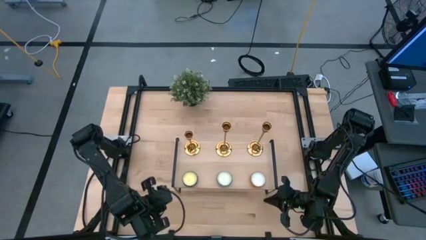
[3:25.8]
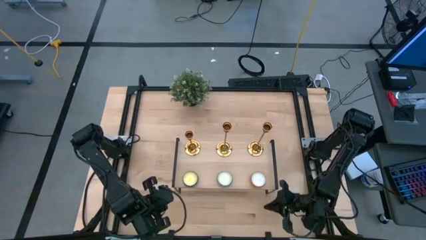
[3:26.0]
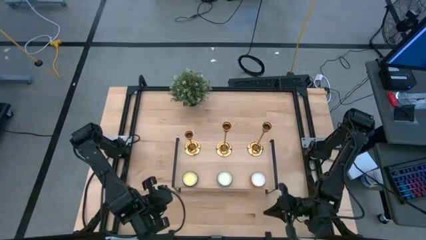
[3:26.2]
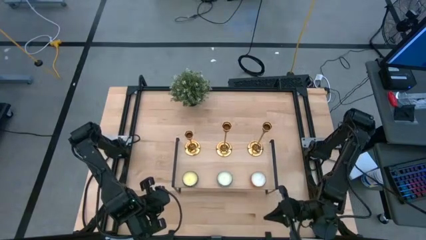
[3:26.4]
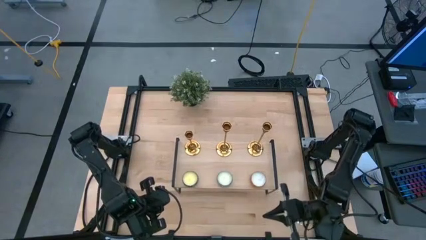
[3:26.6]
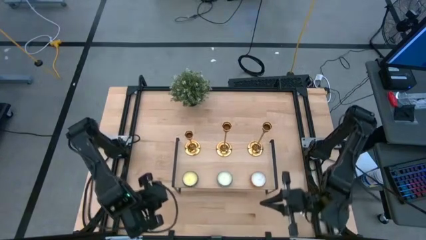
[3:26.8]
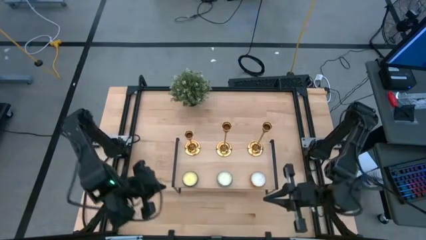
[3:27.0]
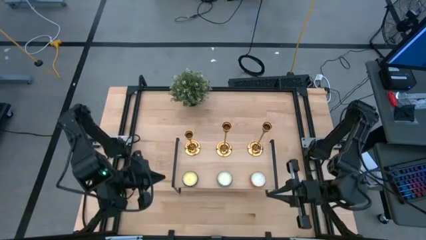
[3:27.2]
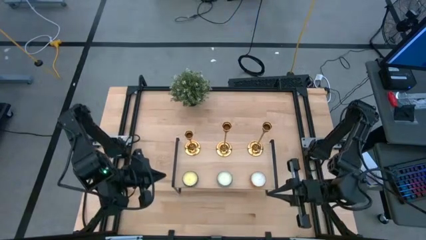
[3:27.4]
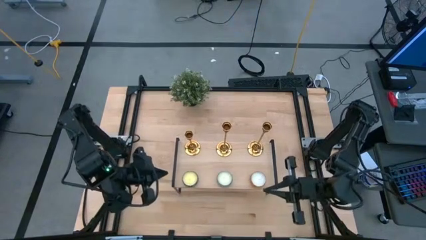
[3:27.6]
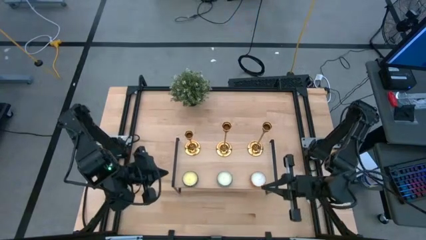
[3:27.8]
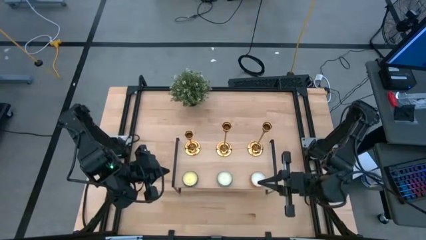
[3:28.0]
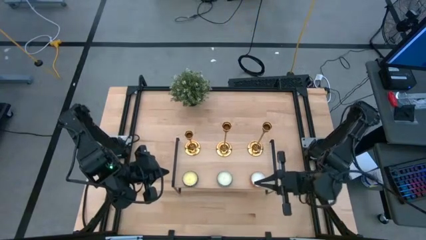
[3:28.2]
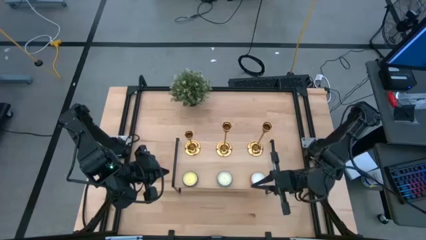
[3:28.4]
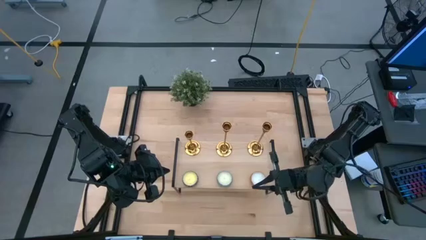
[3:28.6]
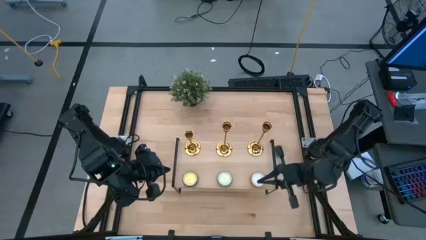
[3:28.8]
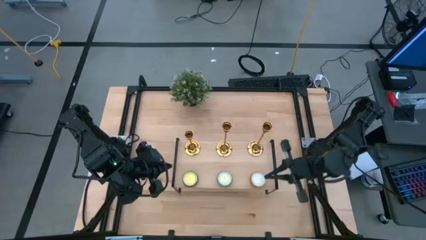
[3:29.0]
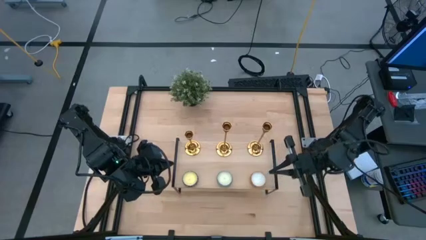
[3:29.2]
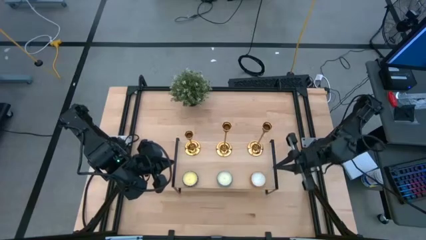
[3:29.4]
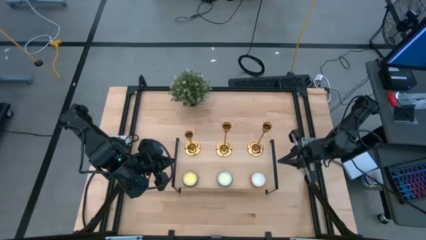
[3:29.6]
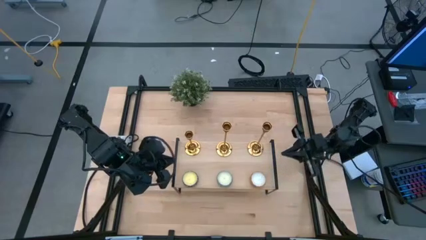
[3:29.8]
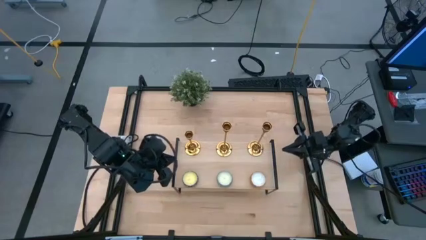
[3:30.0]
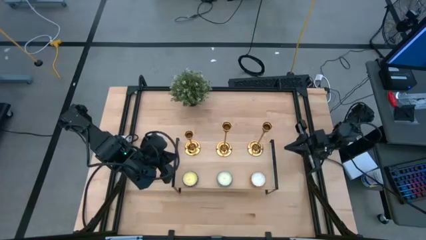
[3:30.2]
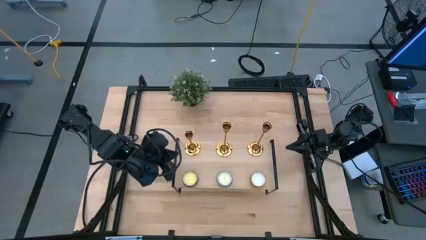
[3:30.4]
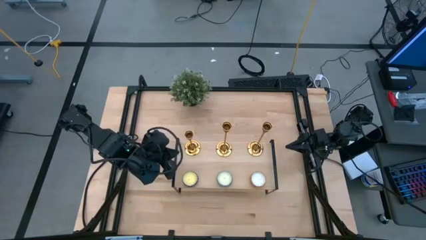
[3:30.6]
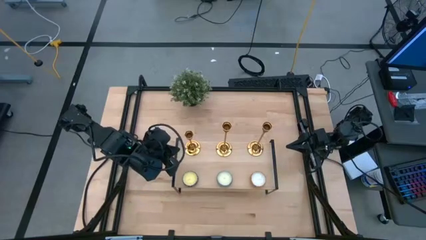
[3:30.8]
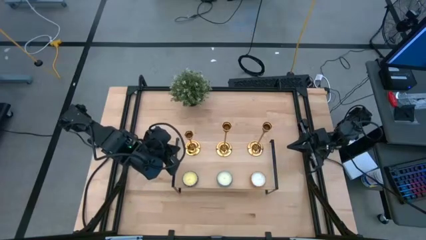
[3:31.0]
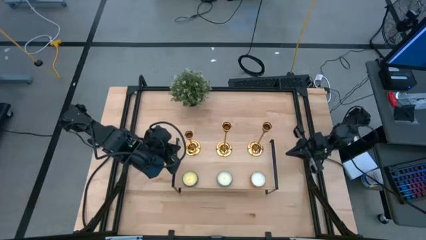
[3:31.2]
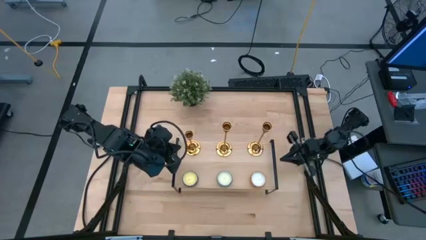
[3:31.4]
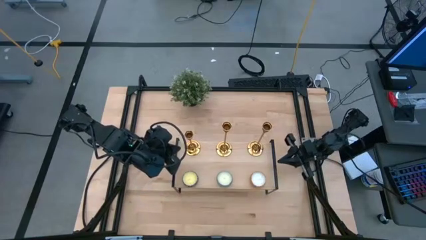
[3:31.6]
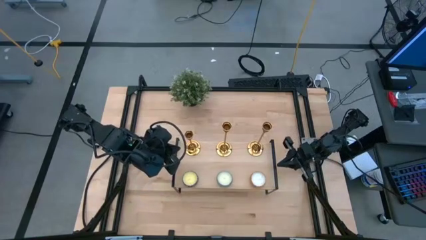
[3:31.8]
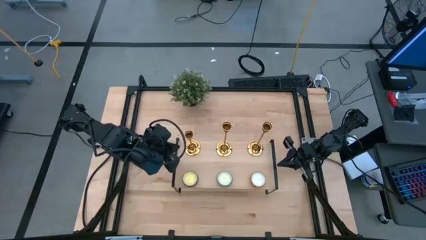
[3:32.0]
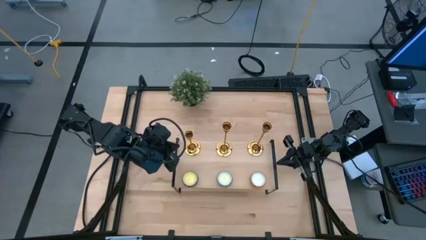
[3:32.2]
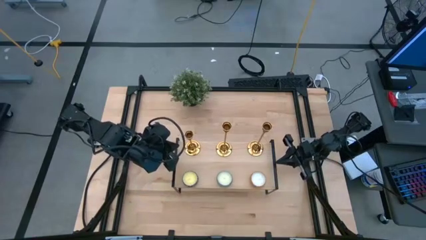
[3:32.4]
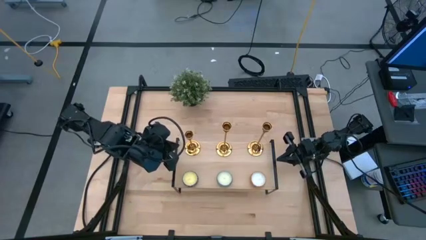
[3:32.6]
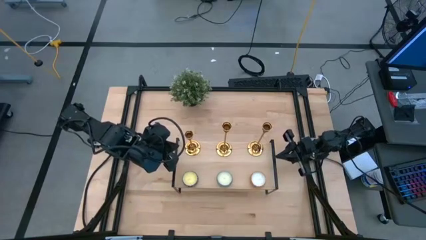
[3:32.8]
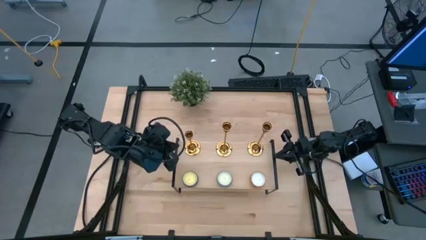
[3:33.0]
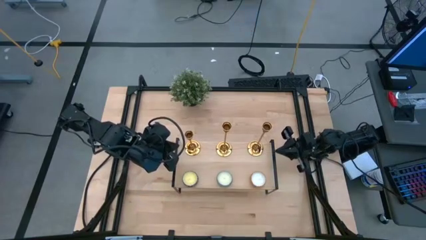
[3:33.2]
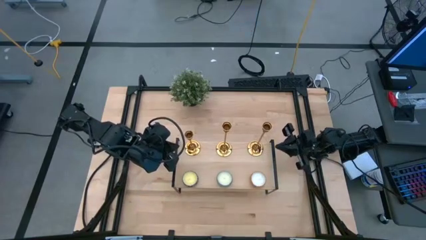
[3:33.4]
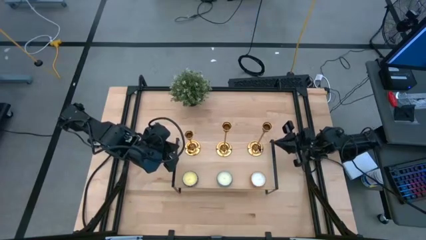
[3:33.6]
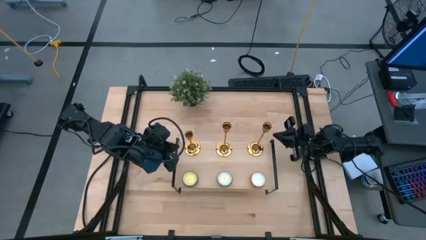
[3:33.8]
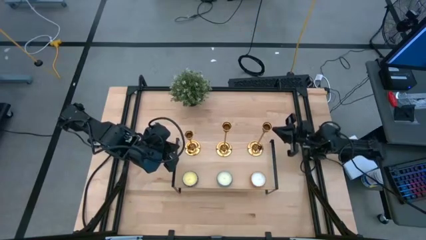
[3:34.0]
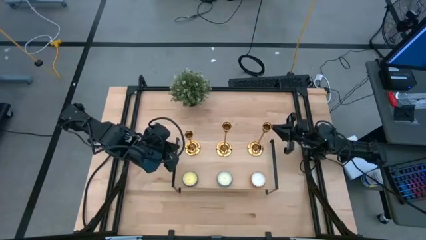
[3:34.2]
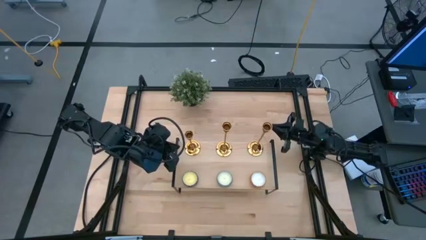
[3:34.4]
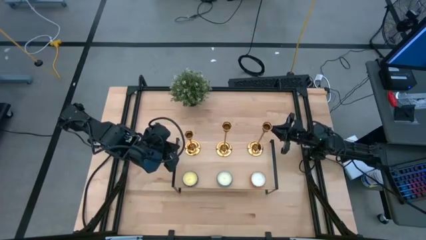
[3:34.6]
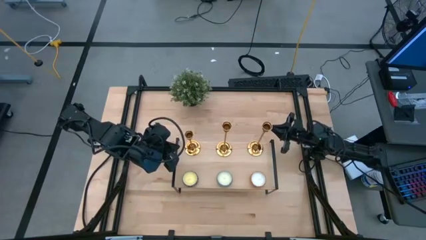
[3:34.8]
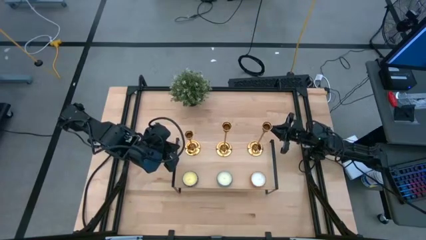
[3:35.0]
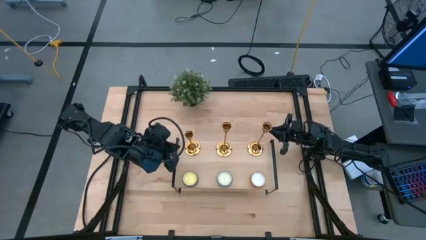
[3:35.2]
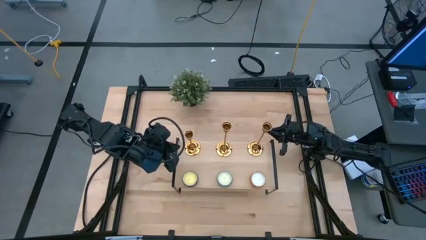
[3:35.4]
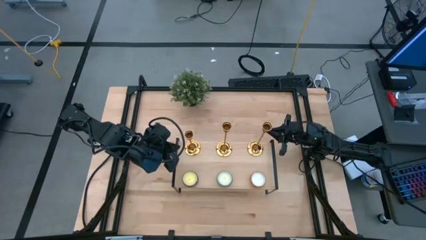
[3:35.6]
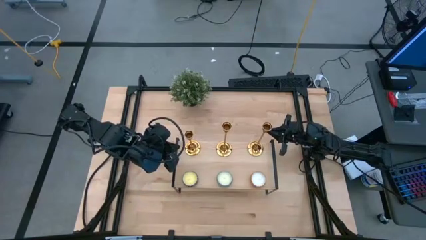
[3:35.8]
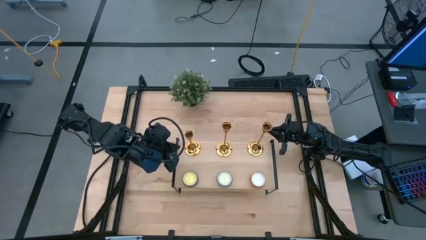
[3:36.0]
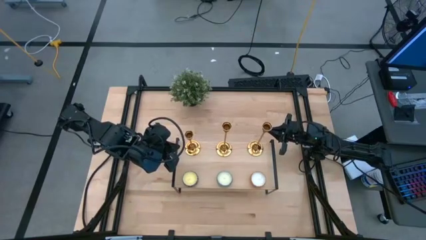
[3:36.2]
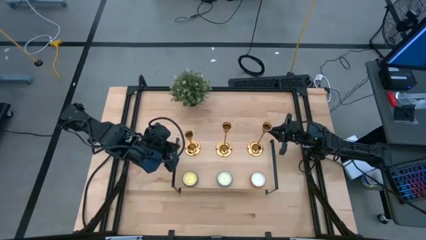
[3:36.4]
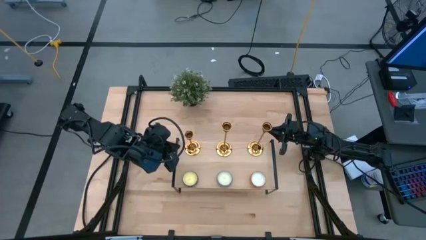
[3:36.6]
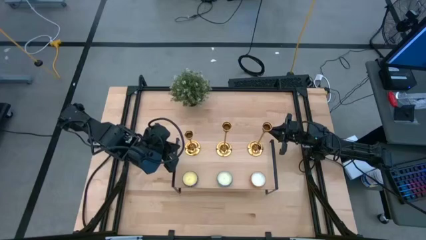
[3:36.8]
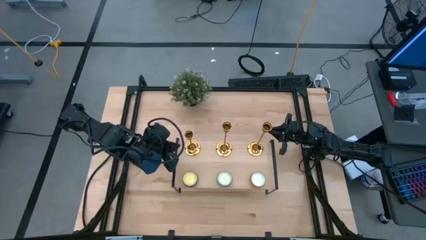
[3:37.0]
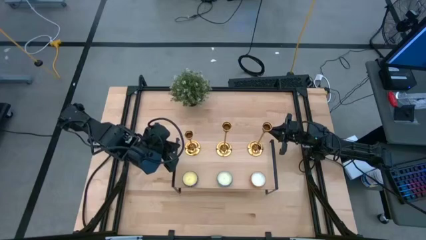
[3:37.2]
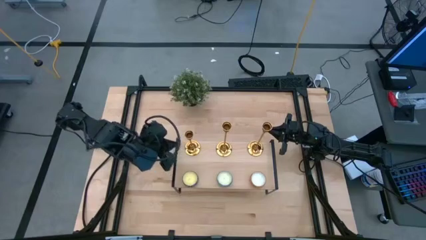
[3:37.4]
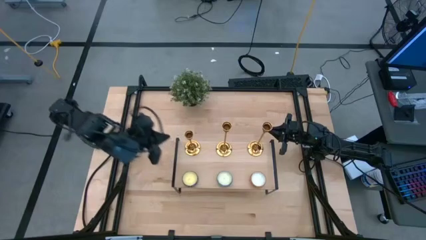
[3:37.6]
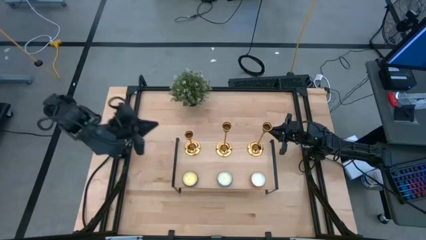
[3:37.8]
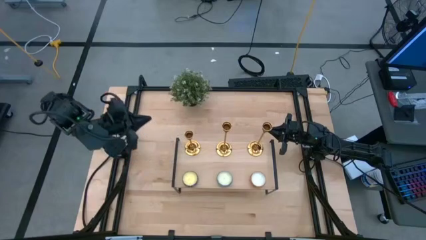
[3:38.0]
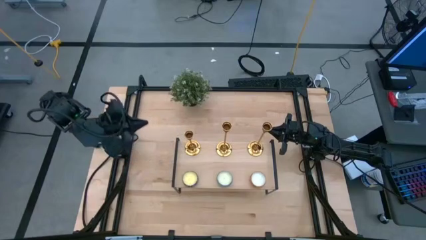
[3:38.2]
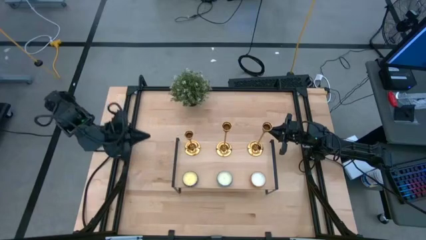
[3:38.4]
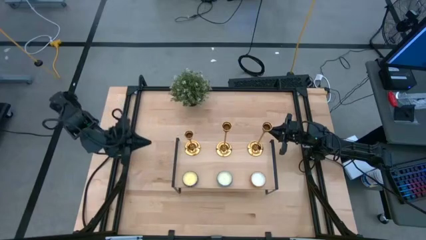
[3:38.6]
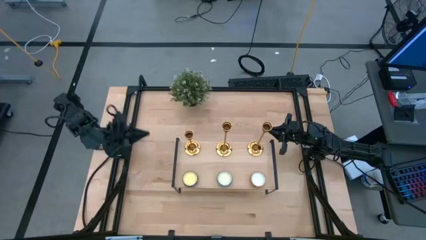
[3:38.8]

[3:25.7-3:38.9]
Task: Pick & Place candle stick holders
Return to Home Position

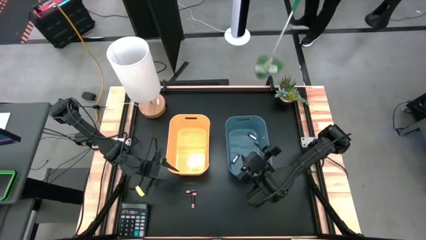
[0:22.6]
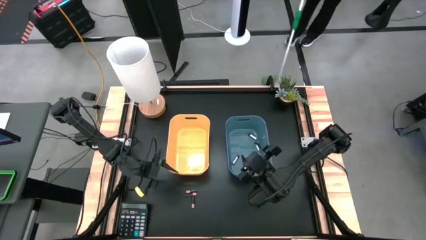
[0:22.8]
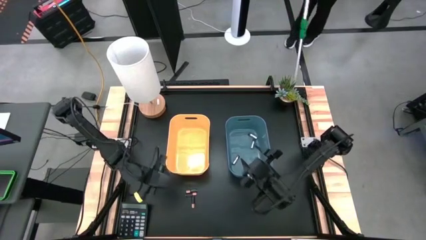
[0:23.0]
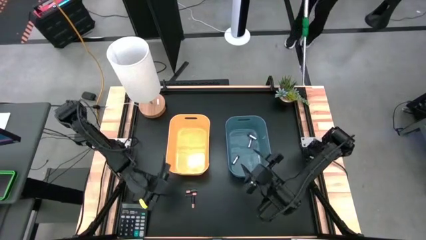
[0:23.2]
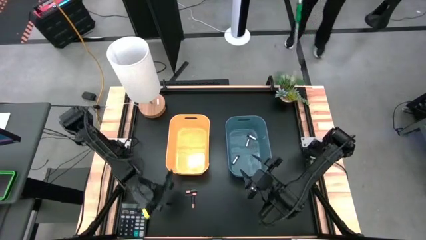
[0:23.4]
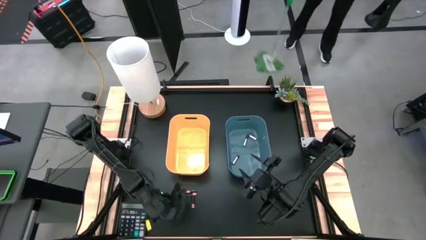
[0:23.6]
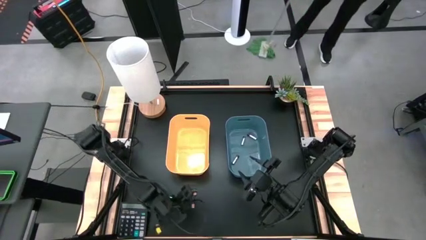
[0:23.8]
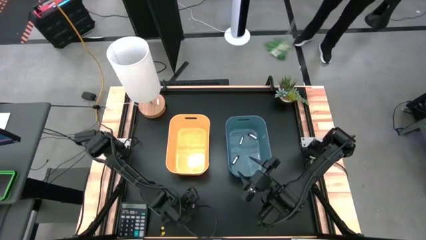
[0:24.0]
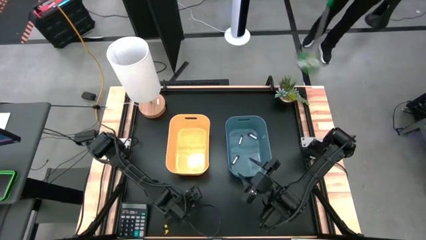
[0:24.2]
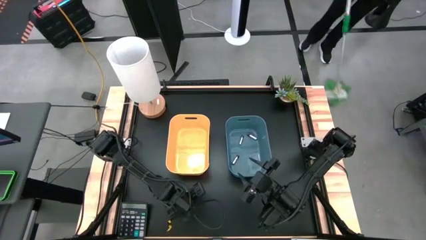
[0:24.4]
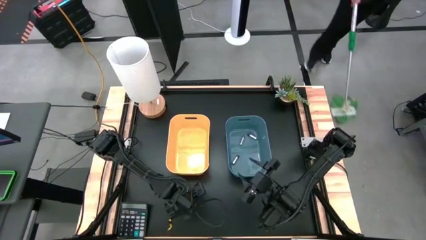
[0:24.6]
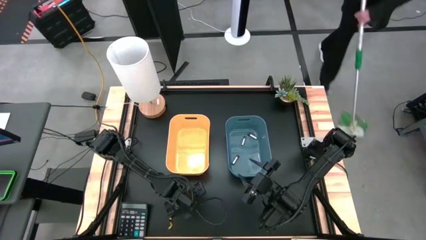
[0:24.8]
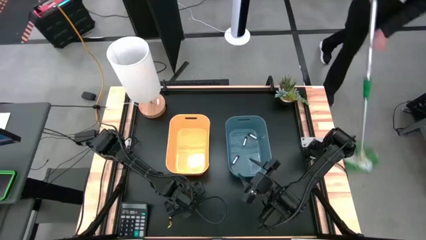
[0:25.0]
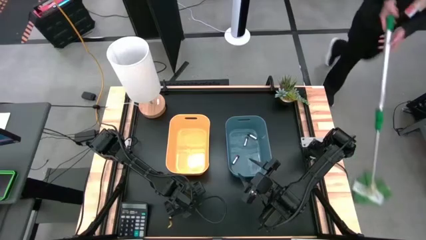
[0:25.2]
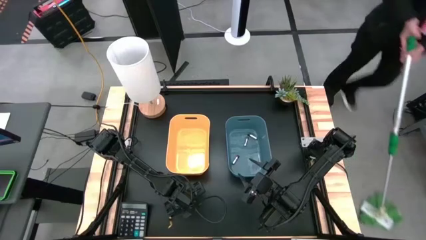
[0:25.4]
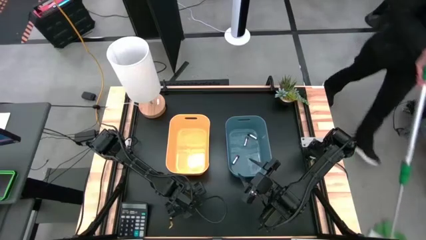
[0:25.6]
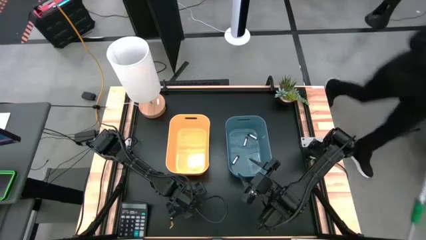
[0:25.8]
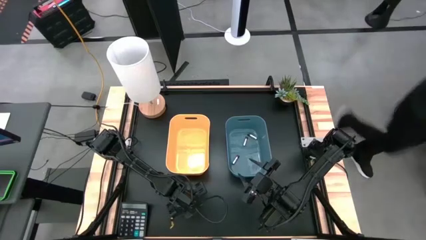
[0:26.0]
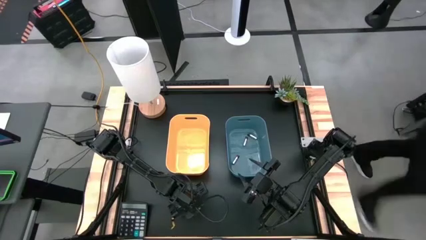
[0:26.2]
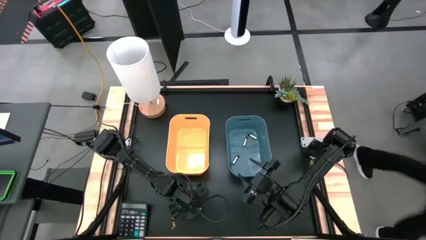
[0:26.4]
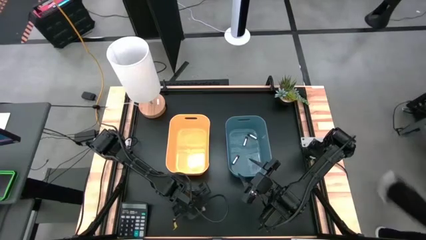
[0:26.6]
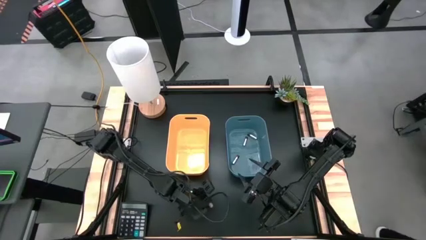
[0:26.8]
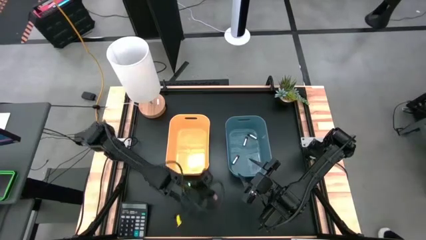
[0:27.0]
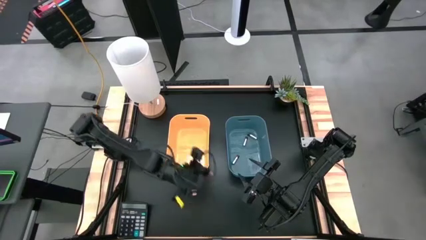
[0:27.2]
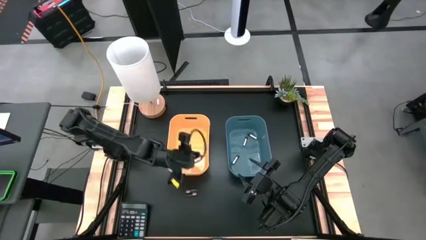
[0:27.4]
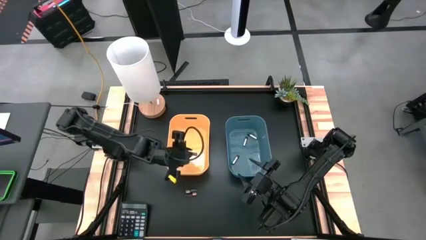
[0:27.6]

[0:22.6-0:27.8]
Task: Sort batteries
Put the bottom black battery into the orange bin
